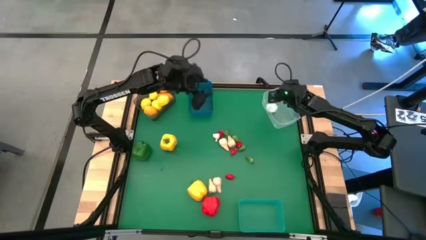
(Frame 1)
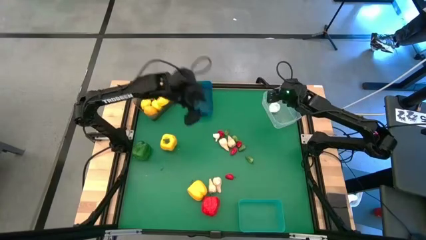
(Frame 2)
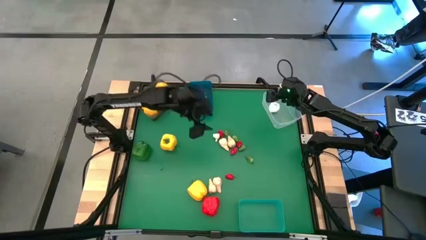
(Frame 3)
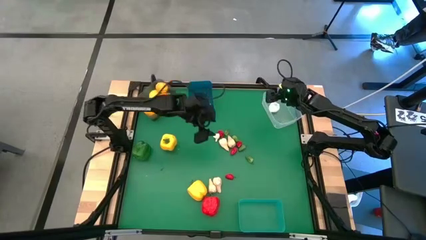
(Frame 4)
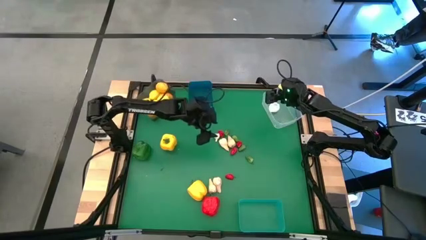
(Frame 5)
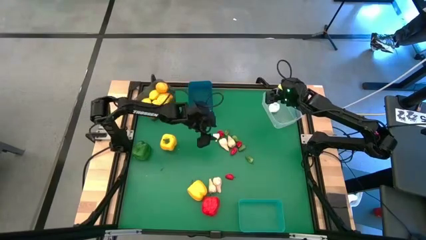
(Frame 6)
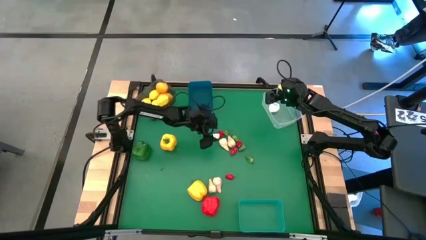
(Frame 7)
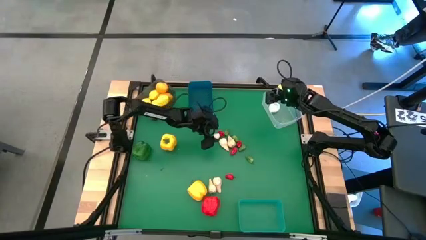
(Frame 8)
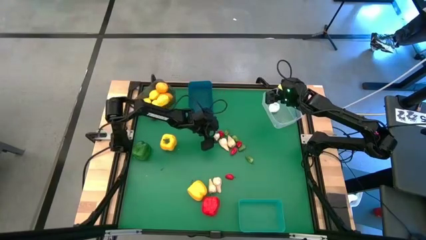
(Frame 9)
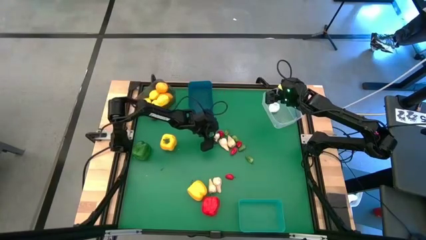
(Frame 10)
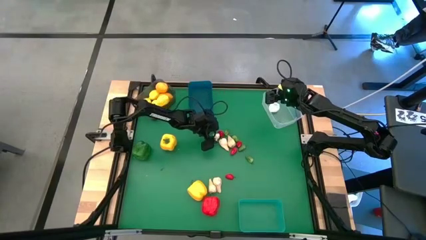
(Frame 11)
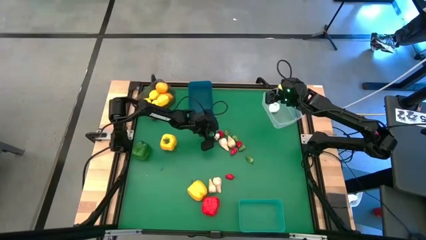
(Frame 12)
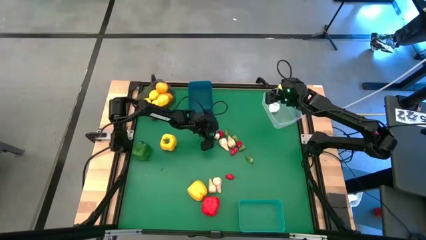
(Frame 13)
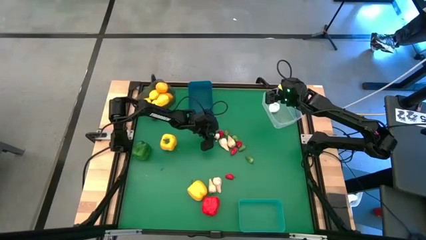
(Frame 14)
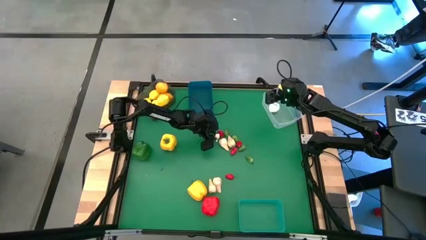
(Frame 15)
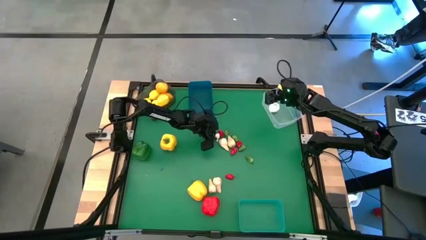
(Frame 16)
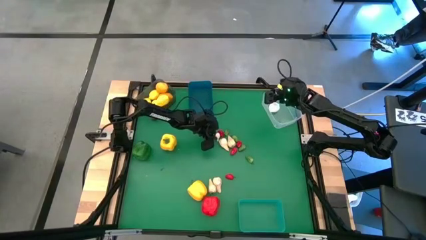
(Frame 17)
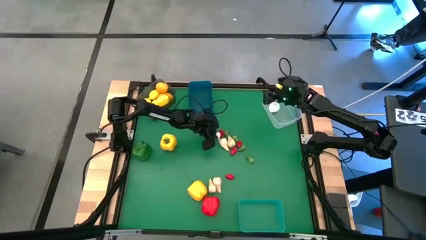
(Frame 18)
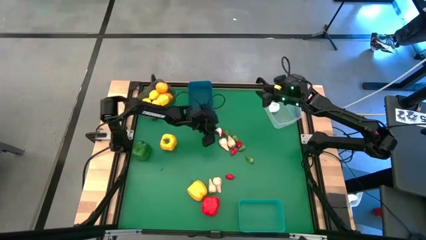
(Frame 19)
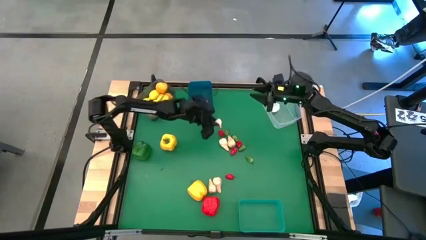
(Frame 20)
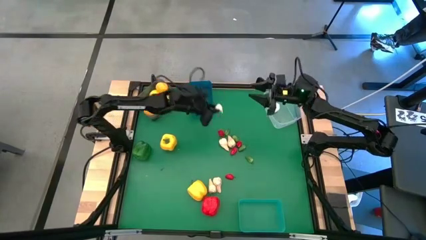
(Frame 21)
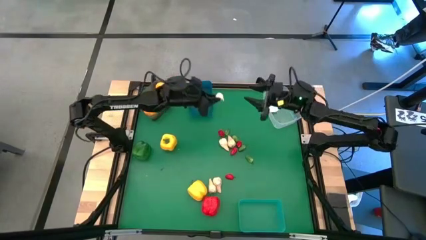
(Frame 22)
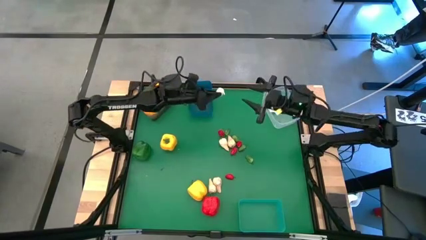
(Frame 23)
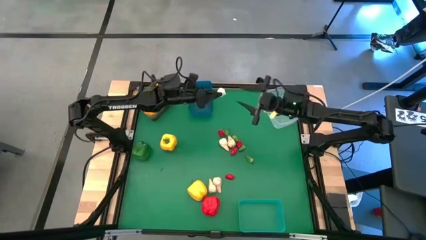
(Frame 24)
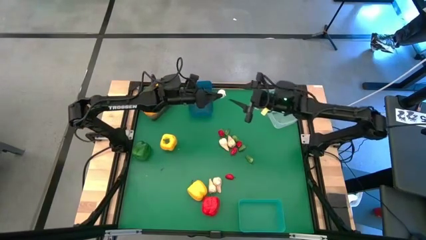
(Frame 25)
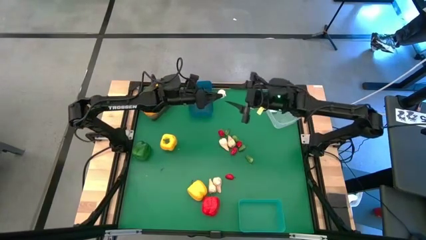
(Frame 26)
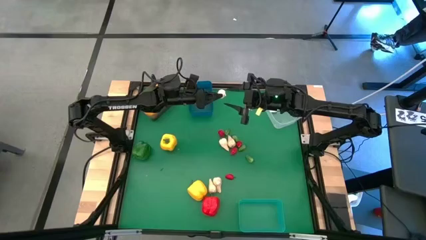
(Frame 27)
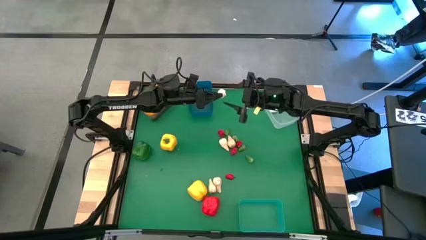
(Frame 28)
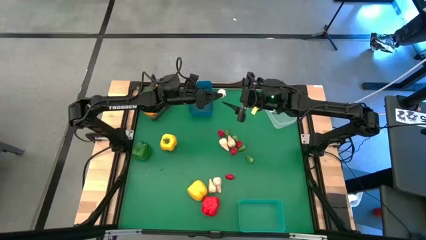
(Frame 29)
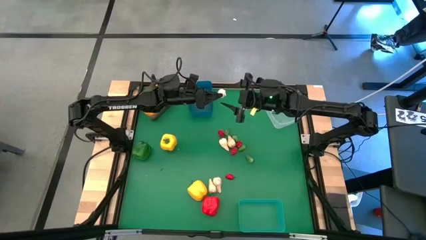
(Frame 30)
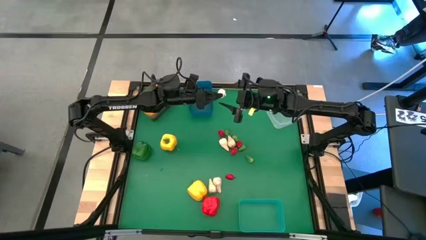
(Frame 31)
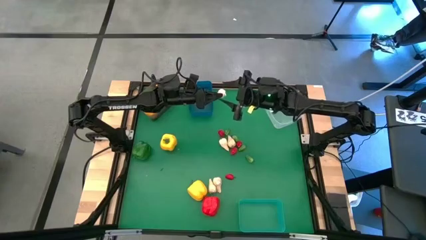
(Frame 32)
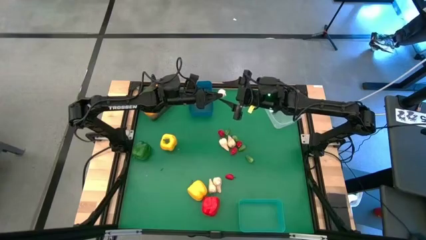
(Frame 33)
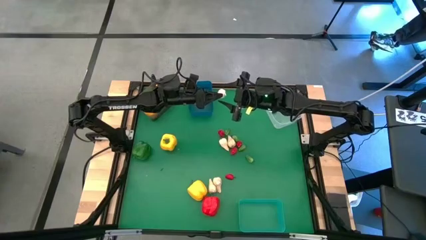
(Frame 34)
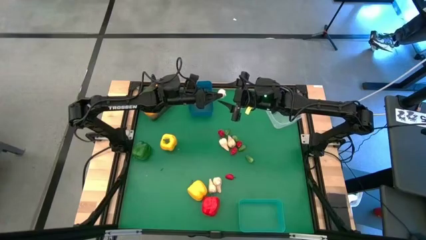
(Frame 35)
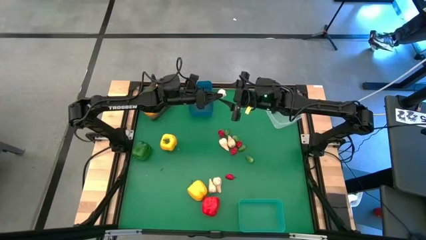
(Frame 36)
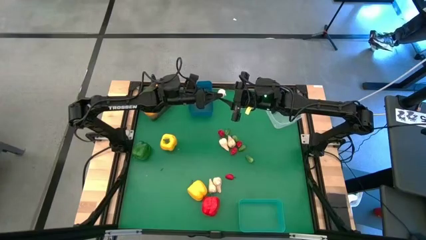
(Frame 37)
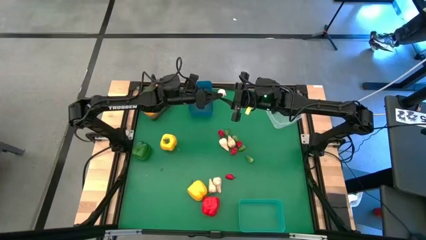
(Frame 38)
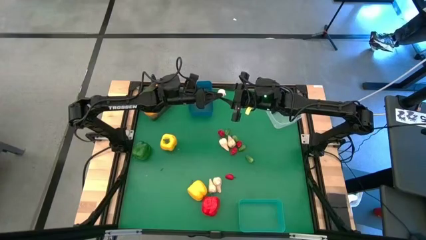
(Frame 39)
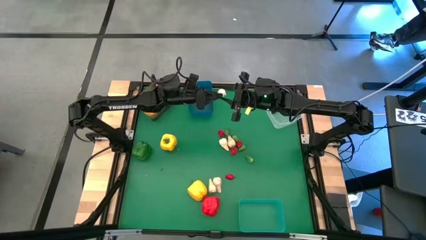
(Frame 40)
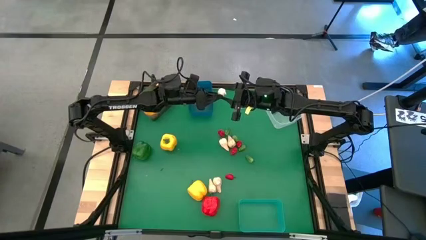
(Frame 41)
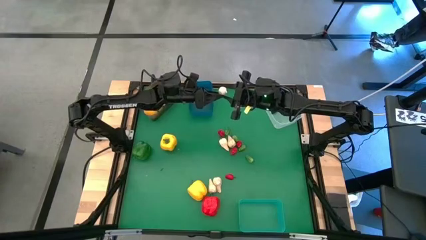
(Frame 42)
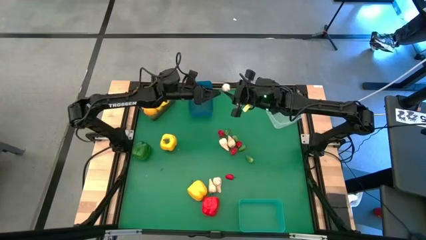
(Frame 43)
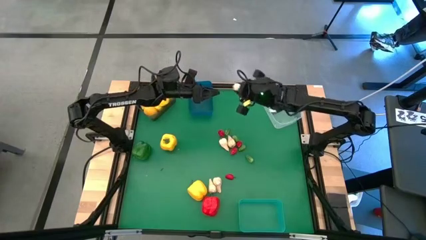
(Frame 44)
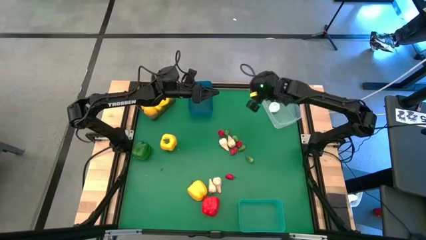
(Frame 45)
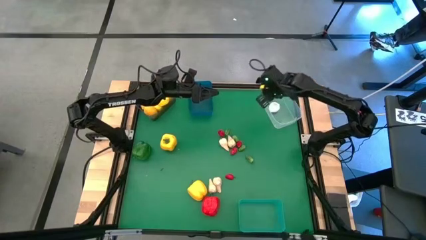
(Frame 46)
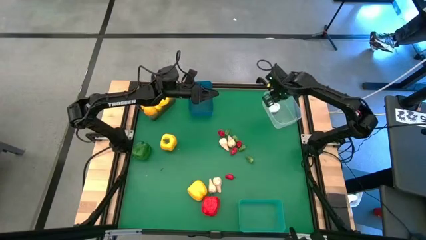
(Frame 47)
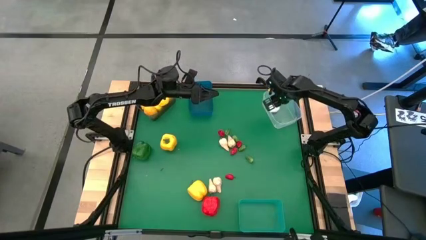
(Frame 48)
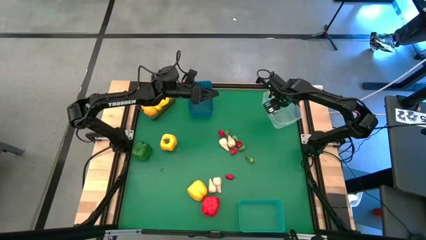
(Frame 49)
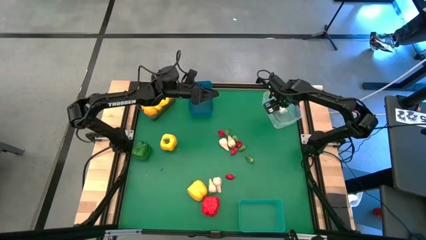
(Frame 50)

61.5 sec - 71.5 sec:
Task: Sort produce into baskets
Put the white garlic into white transparent bin

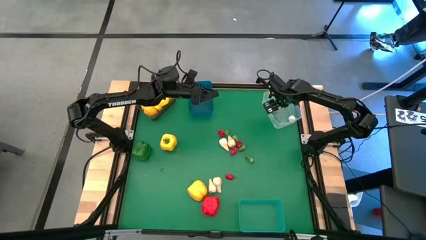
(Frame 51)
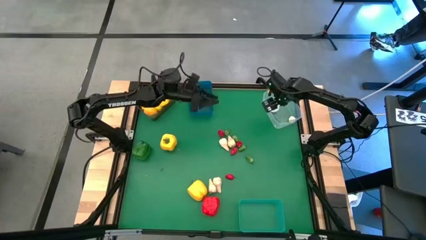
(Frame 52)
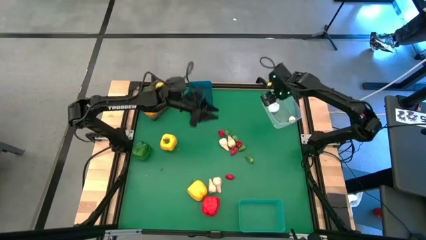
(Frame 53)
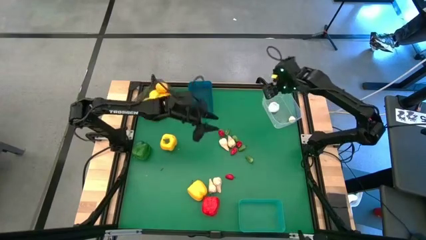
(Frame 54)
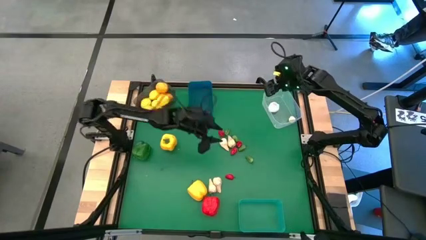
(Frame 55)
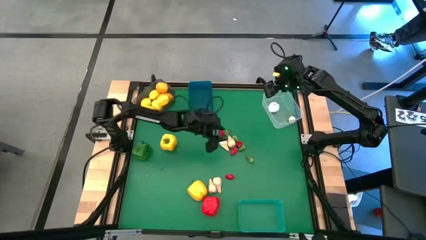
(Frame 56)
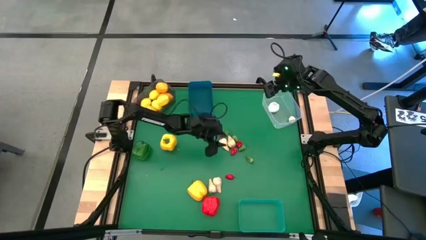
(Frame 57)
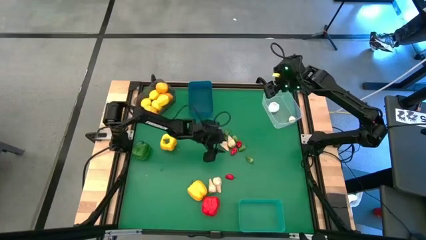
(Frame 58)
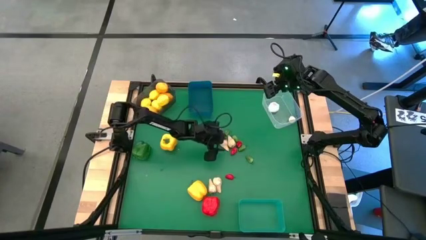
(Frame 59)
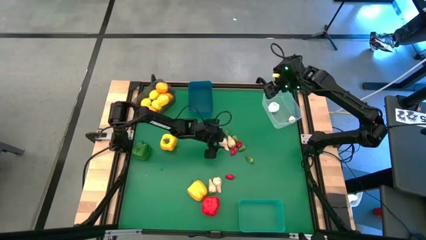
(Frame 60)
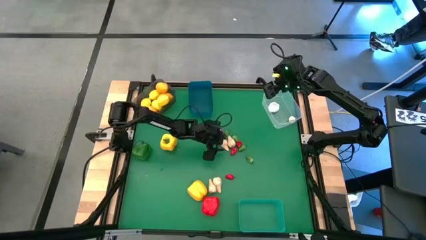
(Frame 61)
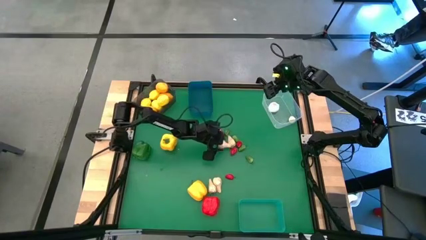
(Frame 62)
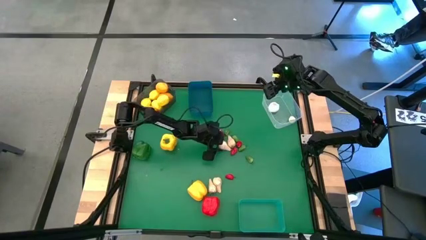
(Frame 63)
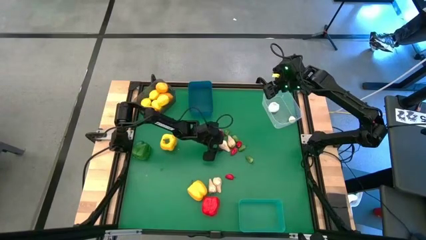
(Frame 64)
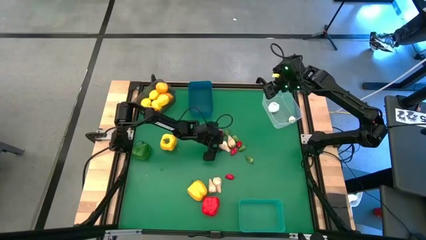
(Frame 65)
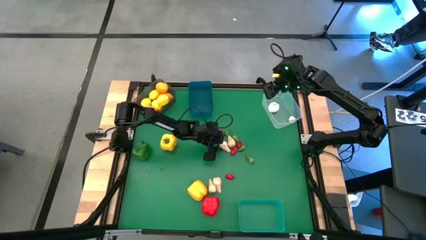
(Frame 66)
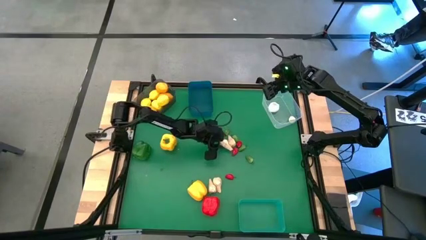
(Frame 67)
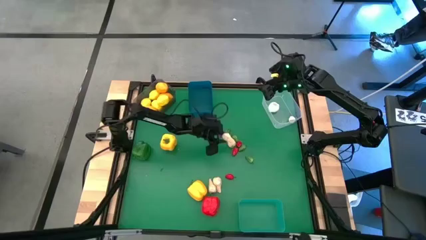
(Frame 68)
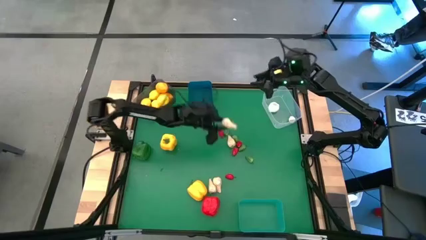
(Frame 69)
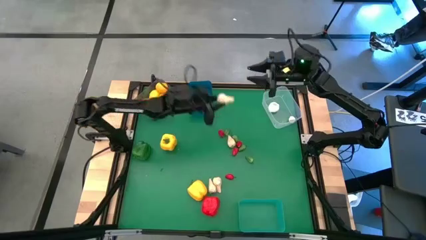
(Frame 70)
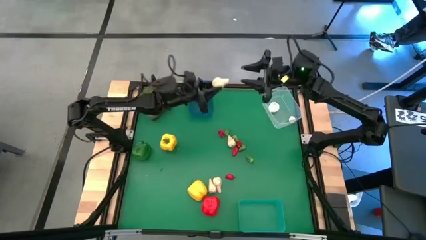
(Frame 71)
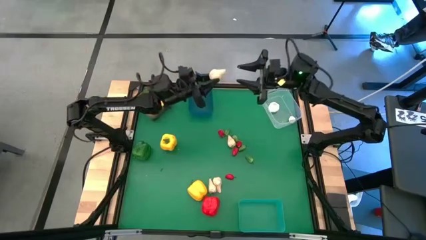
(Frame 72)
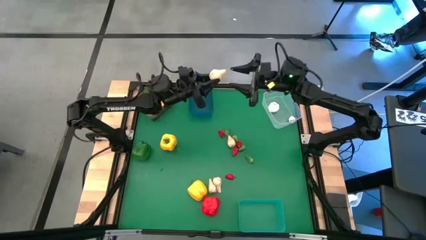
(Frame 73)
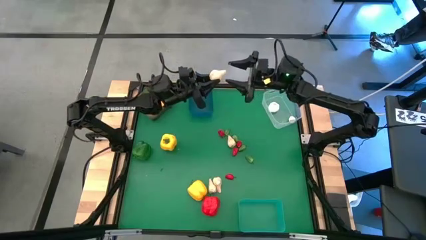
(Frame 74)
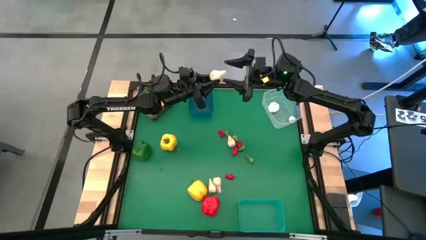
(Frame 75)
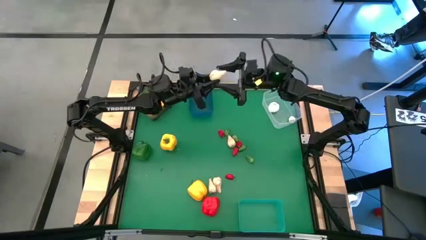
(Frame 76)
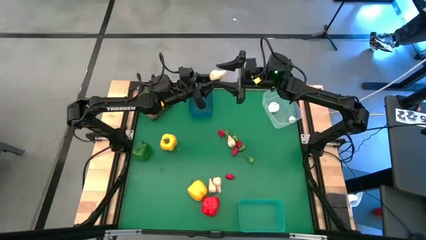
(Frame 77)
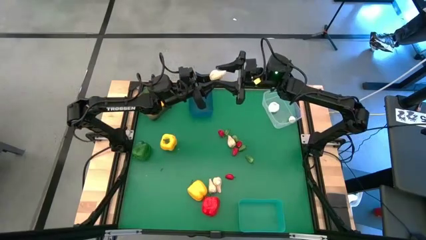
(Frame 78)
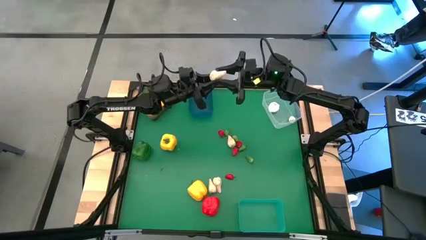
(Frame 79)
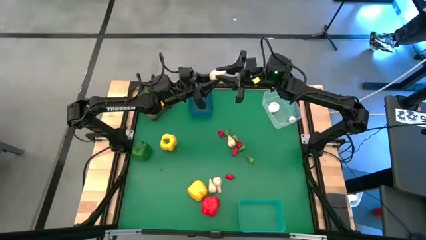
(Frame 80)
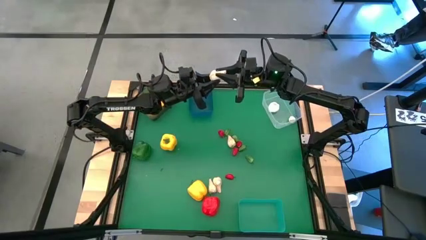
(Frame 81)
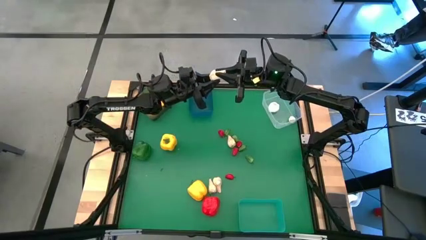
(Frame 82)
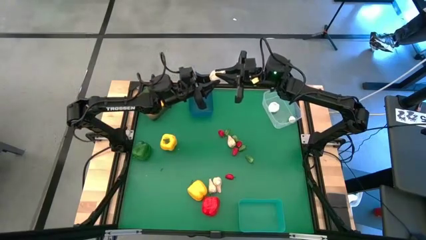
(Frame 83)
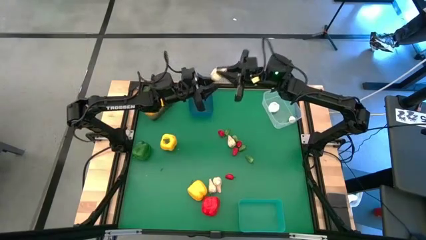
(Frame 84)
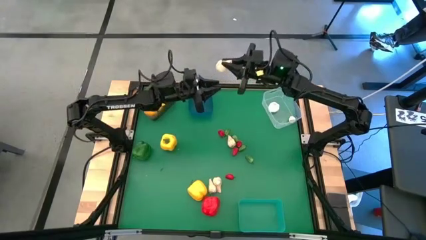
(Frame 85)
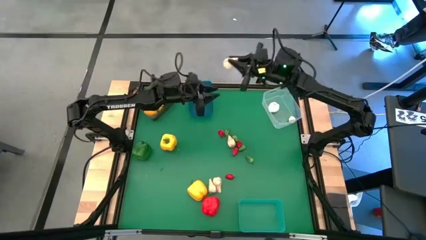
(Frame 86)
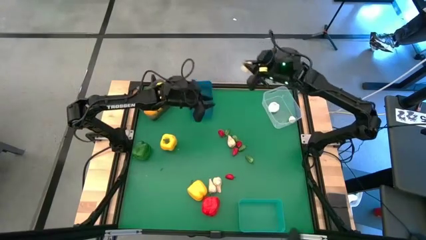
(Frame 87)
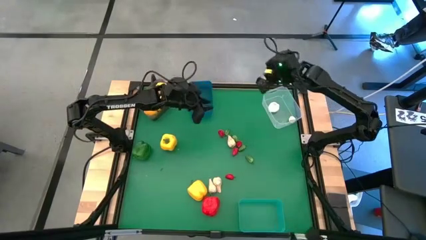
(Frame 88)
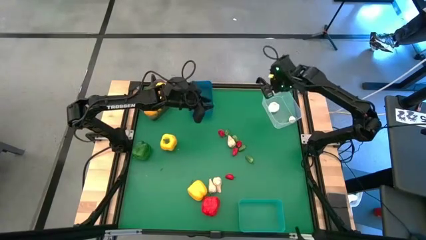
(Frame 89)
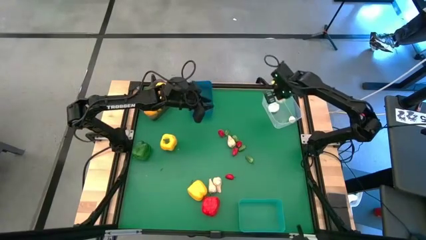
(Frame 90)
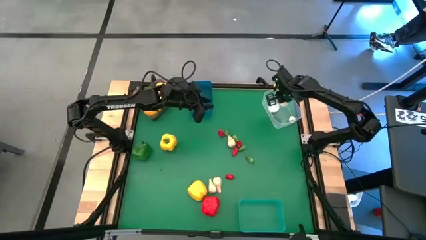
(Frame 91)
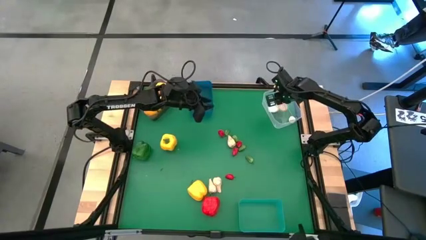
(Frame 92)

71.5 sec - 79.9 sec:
Put the white garlic into white transparent bin
